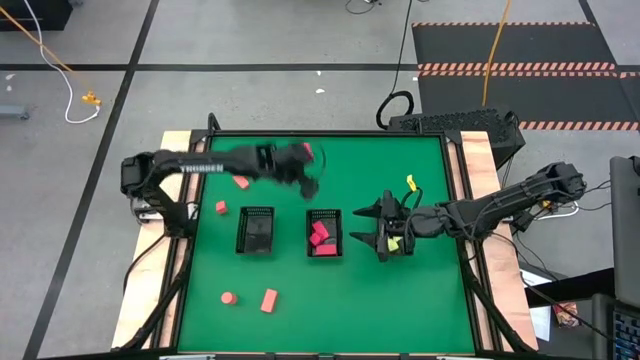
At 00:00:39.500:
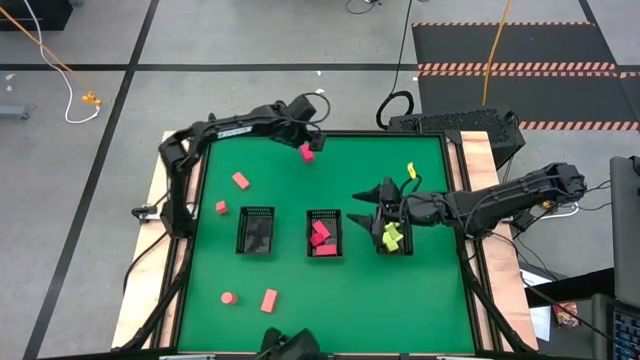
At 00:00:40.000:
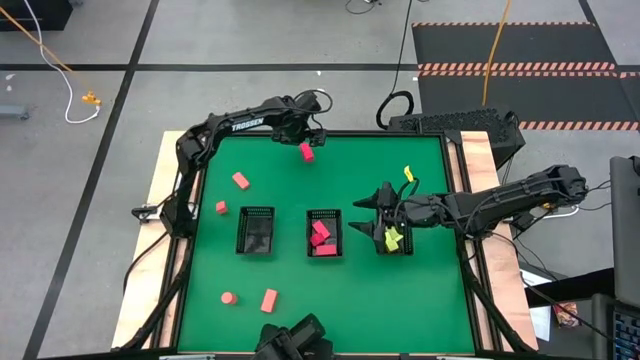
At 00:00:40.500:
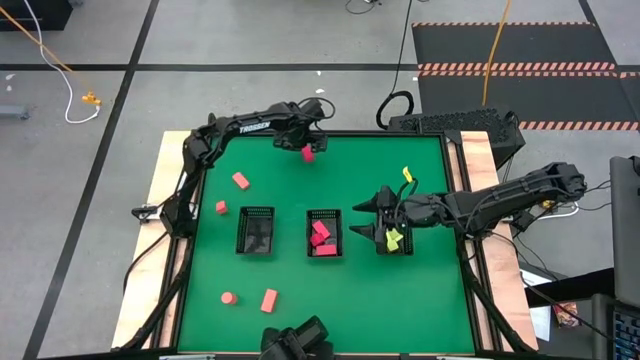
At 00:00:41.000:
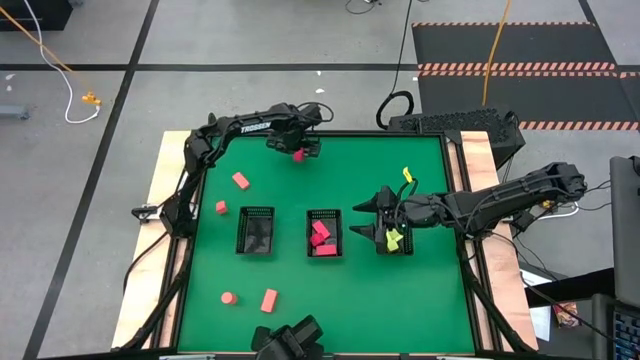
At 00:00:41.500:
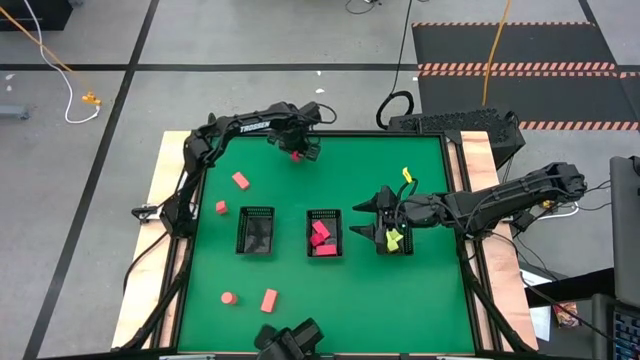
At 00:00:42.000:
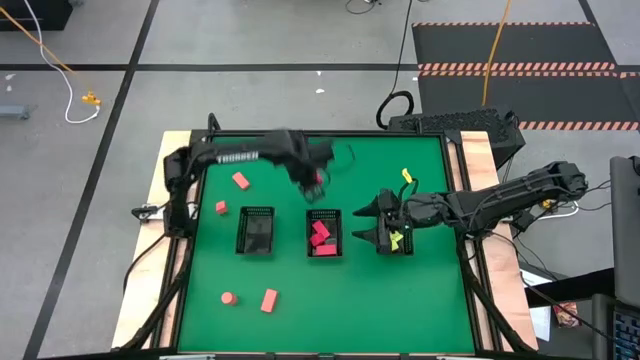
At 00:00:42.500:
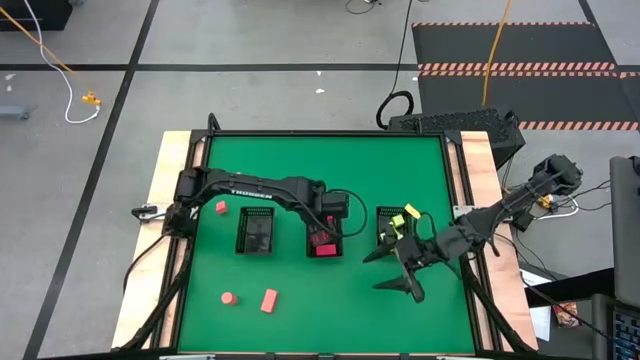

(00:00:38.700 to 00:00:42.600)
Task: Sort & place blocks by color
Put the red block into the middle black basket

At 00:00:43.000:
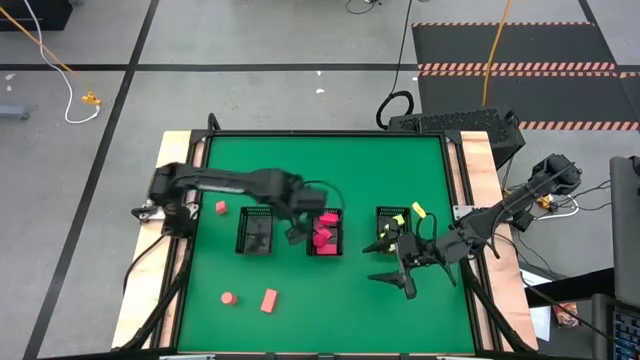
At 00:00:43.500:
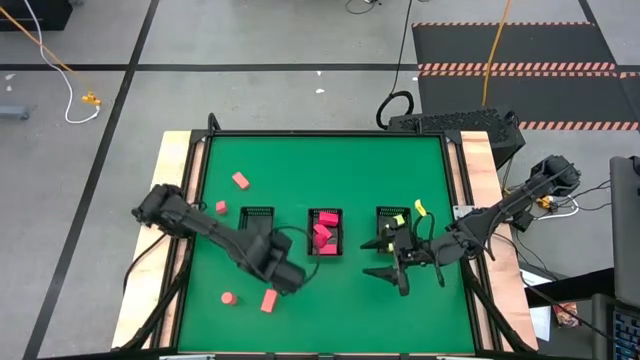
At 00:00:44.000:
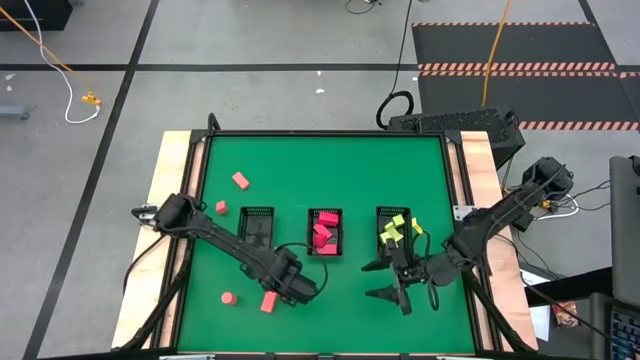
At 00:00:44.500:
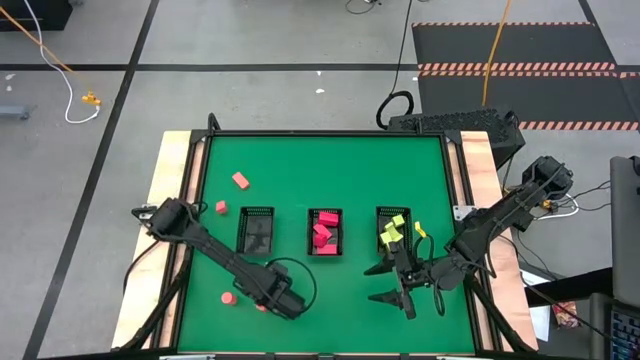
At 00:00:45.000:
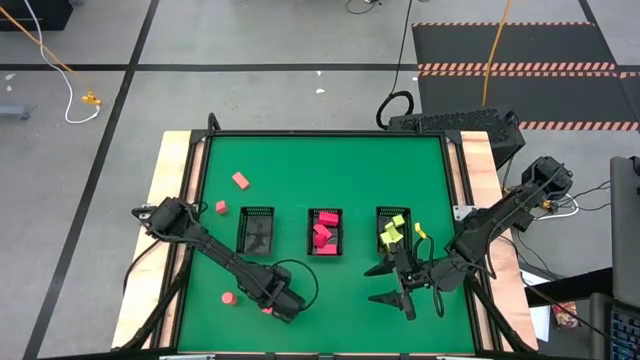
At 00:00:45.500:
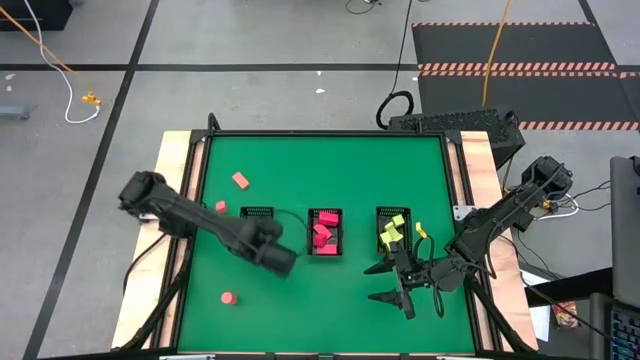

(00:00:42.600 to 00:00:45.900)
Put the orange block into the left black basket

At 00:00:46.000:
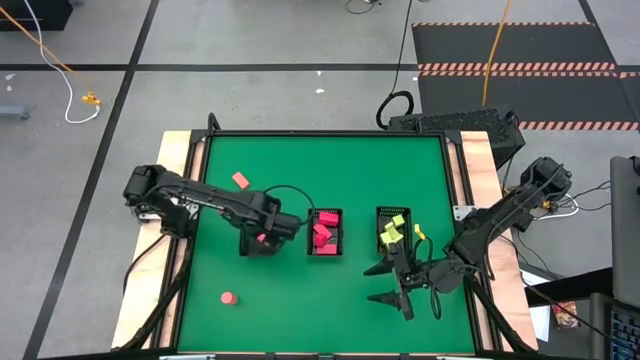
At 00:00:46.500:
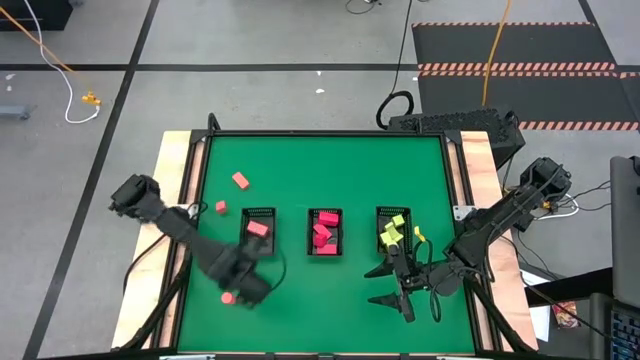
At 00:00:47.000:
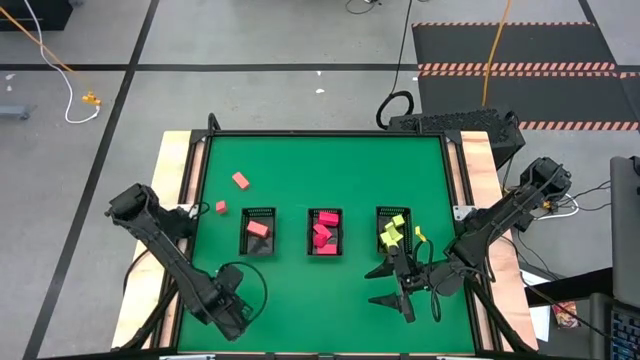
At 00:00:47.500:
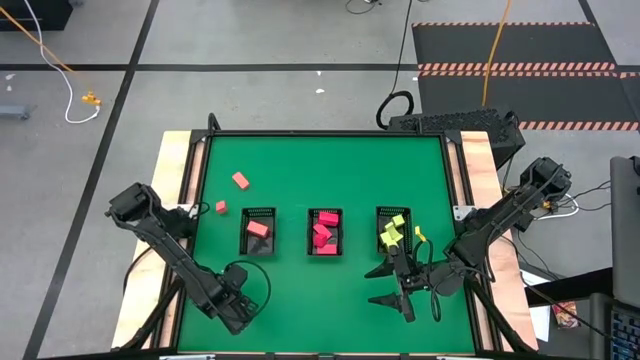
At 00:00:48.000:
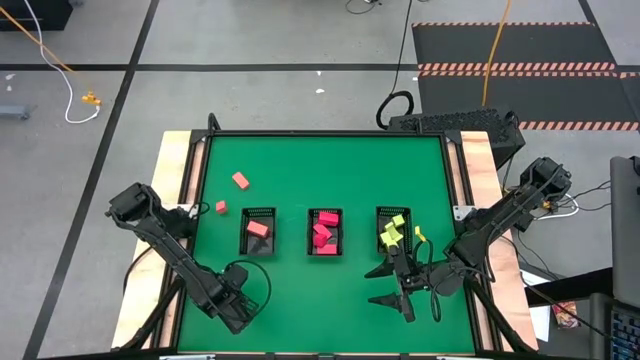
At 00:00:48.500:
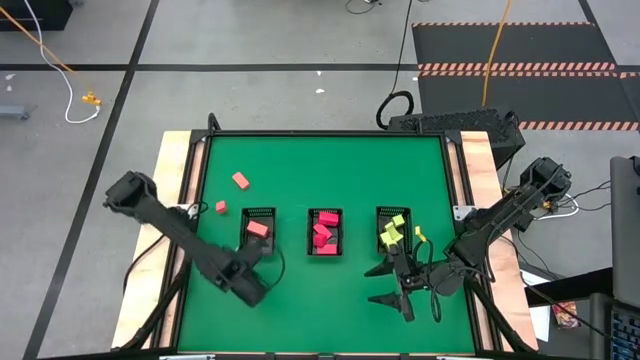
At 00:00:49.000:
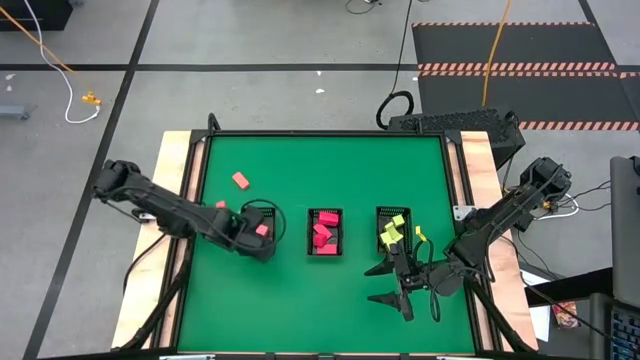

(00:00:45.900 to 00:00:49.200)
Put the orange block into the left black basket

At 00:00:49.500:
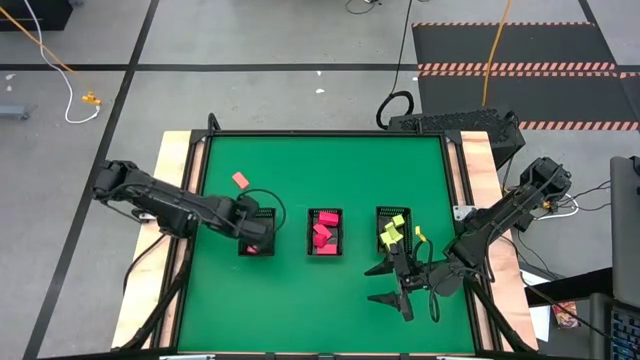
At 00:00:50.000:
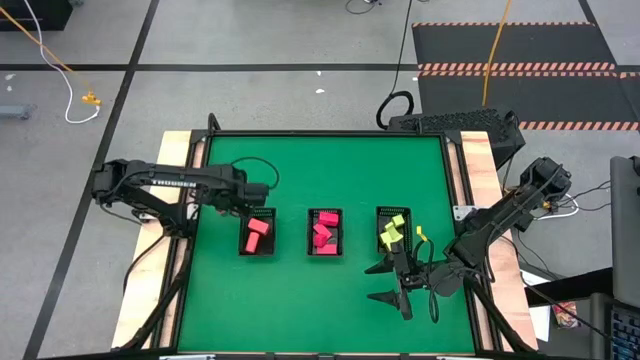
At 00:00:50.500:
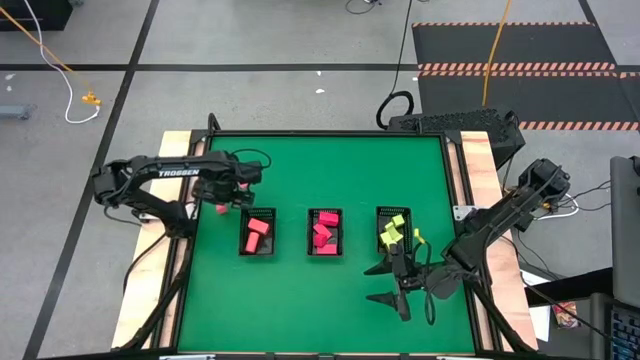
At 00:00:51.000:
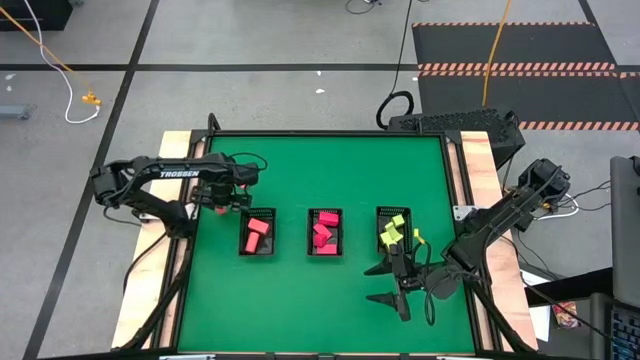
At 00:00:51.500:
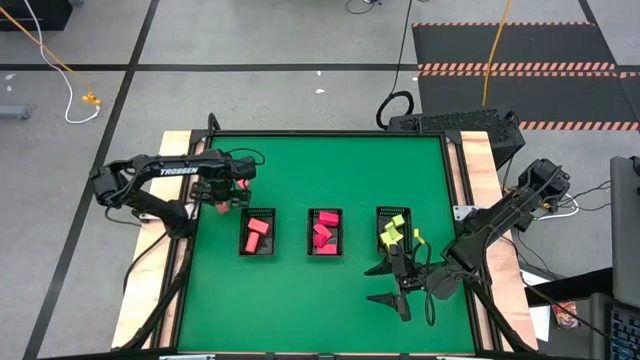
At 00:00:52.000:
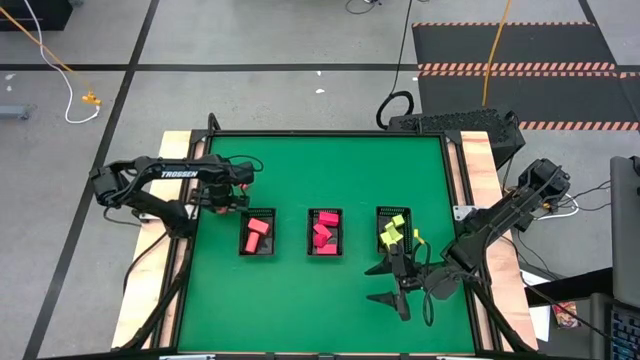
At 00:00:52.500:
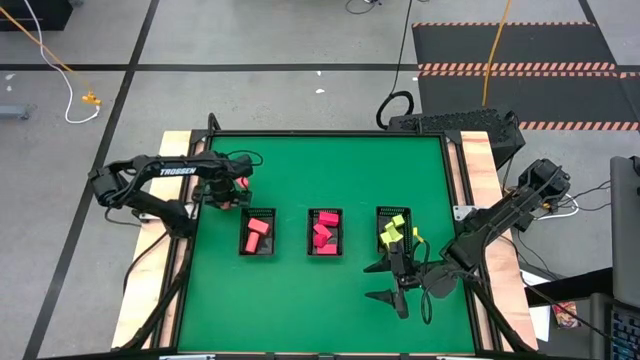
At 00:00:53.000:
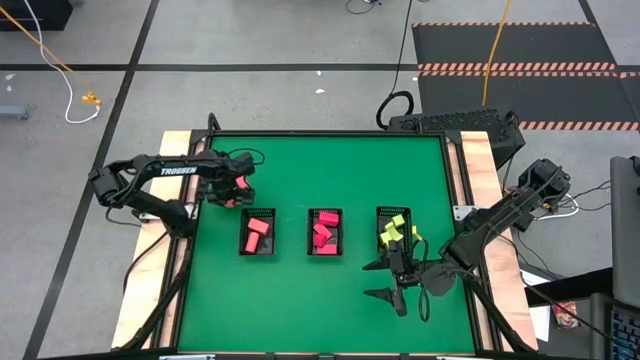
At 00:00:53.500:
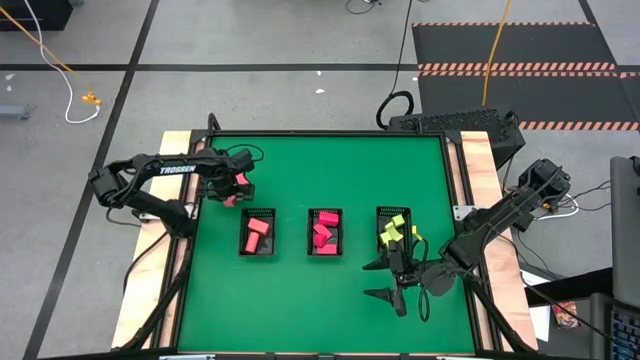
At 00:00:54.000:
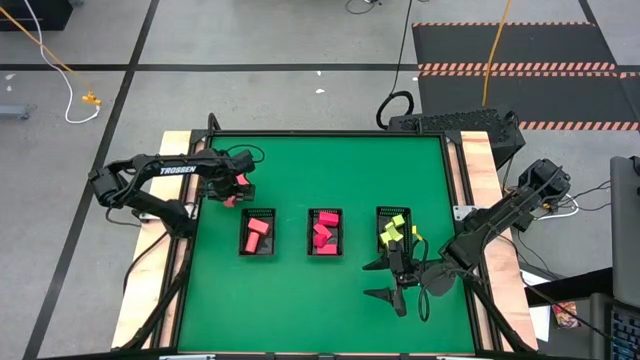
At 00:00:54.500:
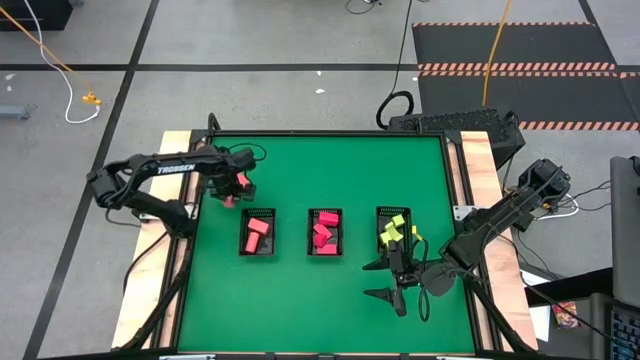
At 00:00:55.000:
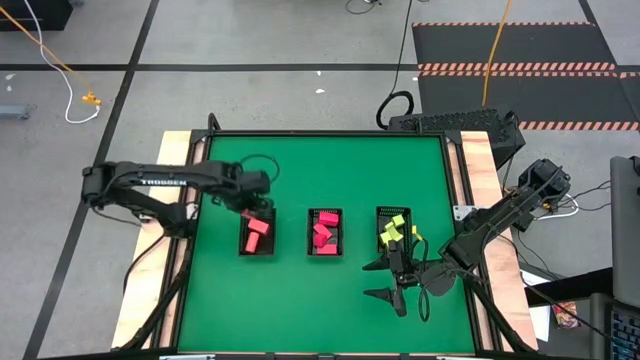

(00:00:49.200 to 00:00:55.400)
Put the orange block into the left black basket

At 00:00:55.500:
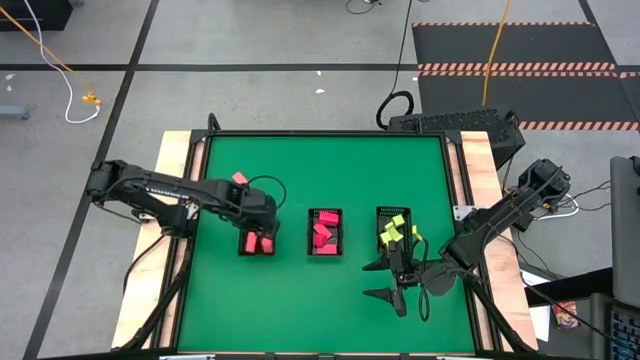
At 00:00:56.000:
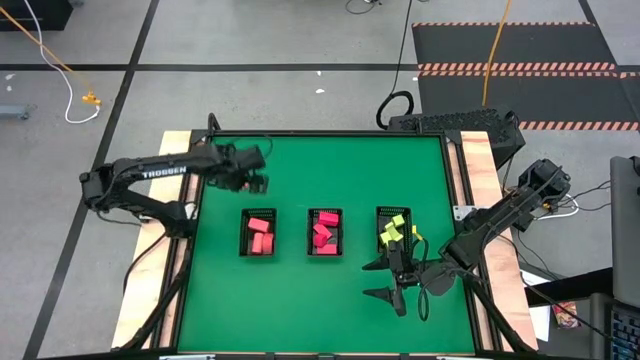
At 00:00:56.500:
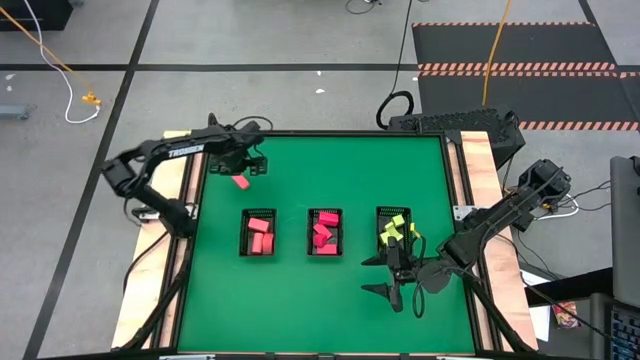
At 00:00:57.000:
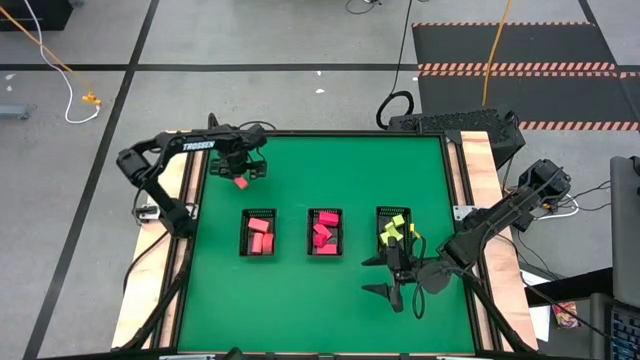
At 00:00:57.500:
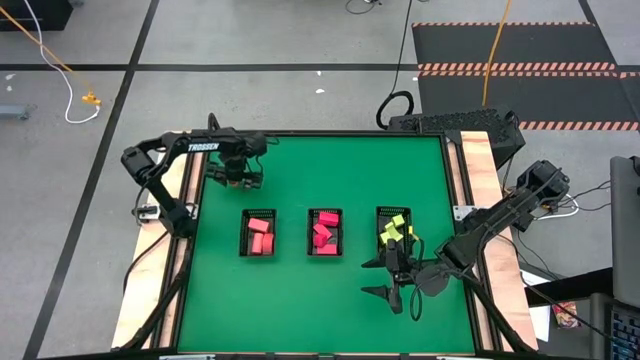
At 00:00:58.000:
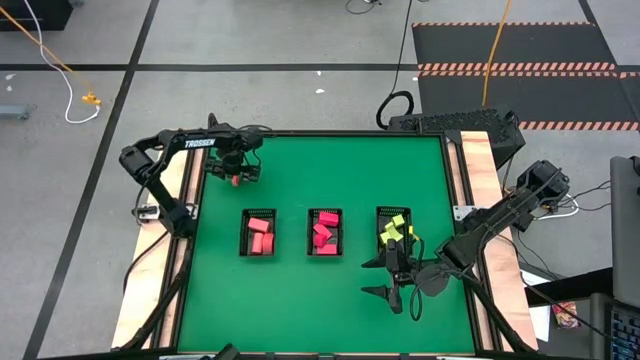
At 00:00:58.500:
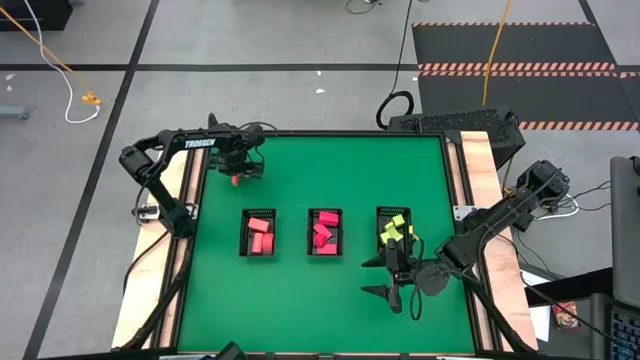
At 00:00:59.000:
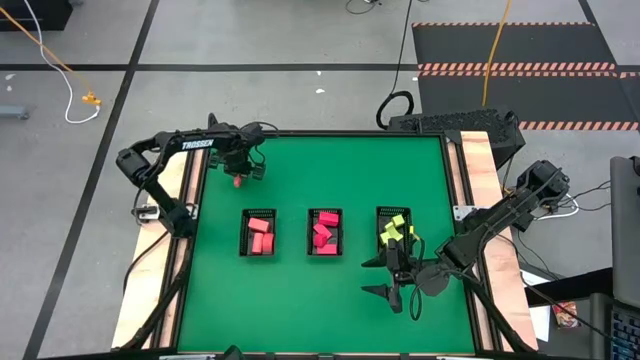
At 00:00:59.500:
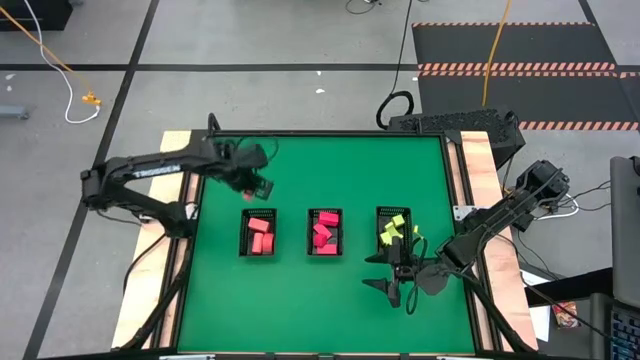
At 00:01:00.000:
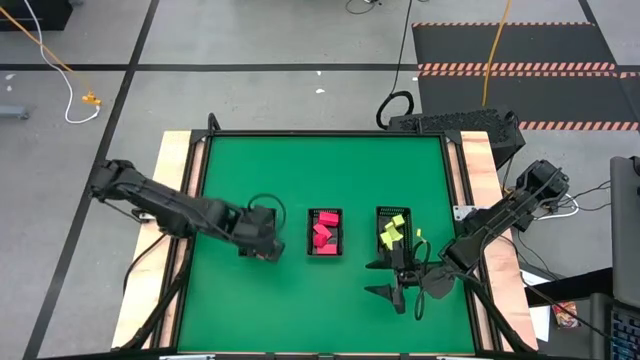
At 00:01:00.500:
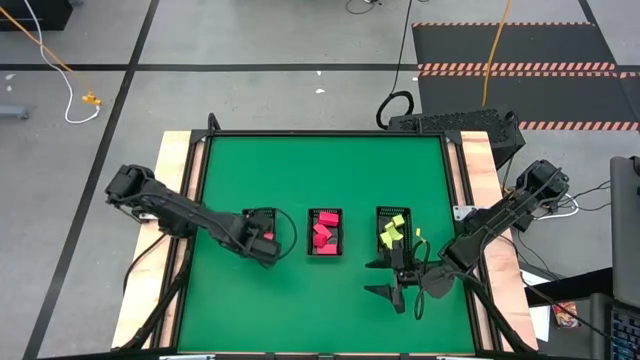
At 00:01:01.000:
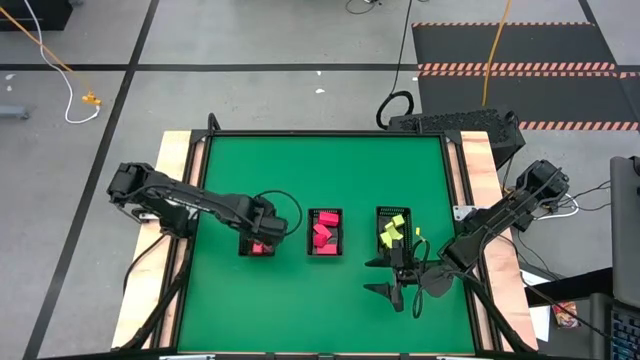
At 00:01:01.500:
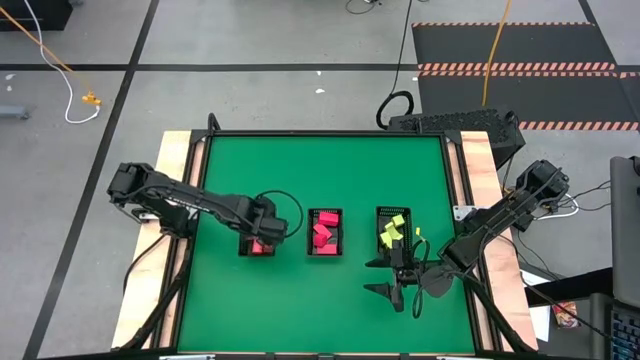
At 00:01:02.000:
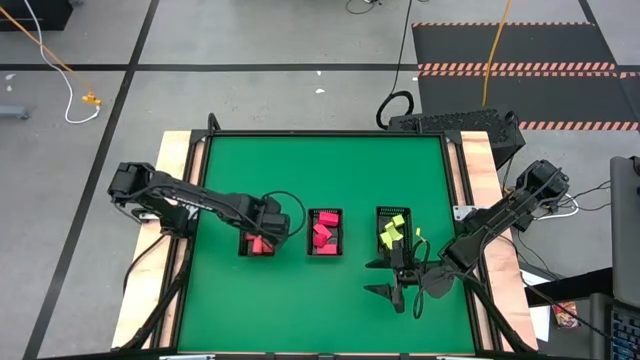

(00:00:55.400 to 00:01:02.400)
Put the orange block into the left black basket
